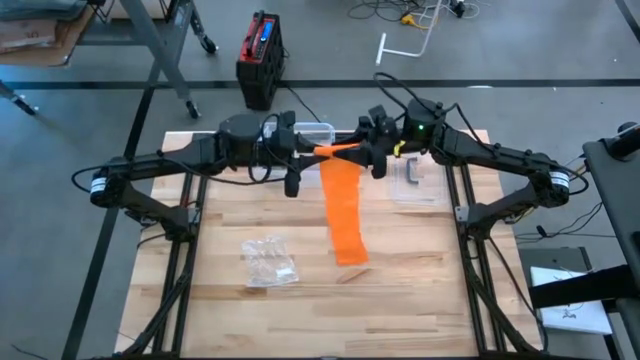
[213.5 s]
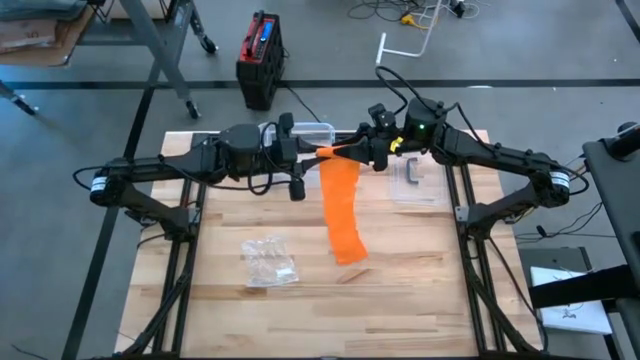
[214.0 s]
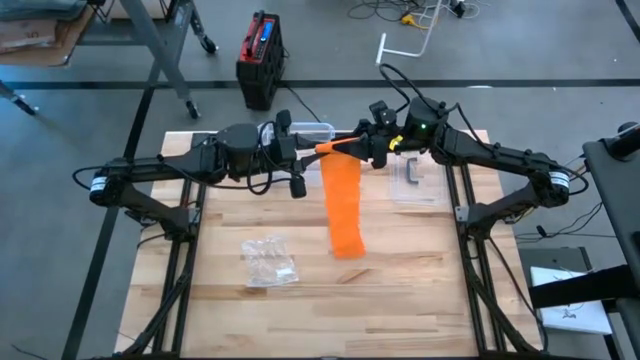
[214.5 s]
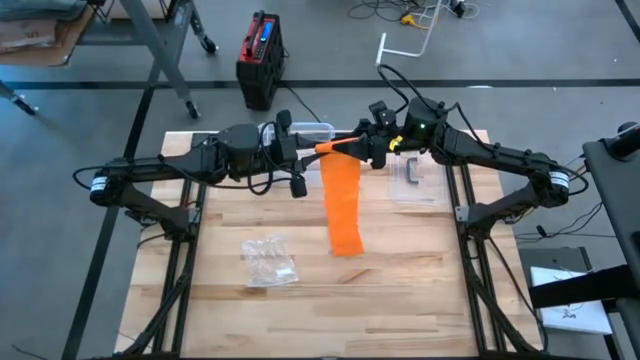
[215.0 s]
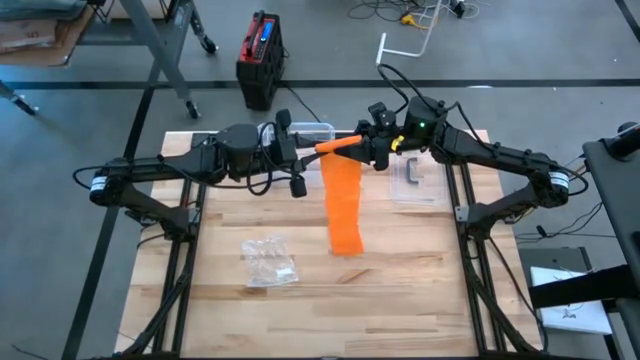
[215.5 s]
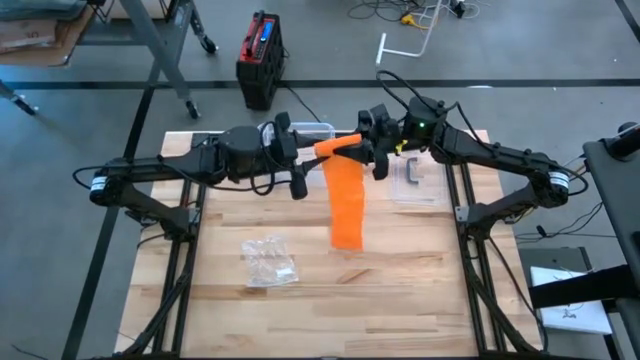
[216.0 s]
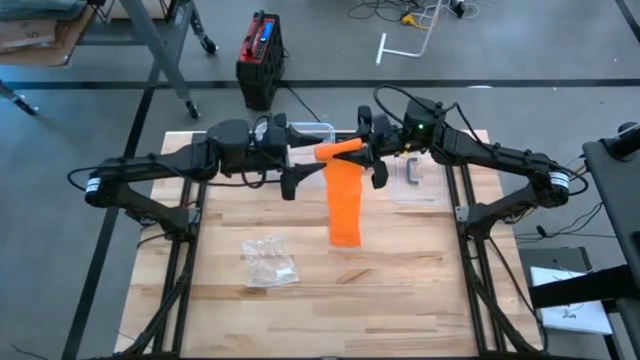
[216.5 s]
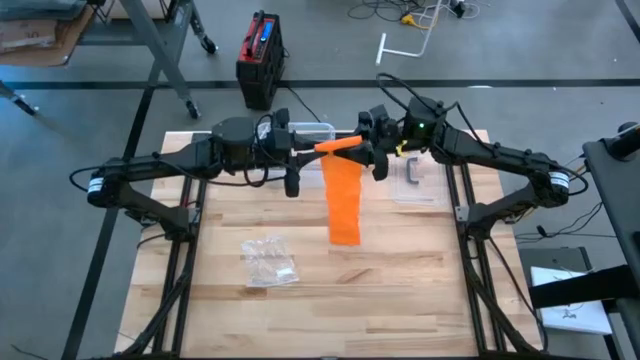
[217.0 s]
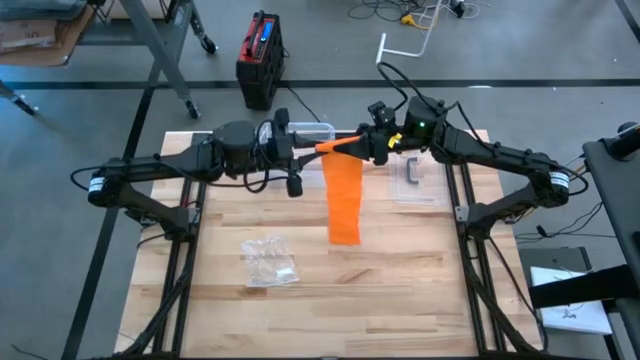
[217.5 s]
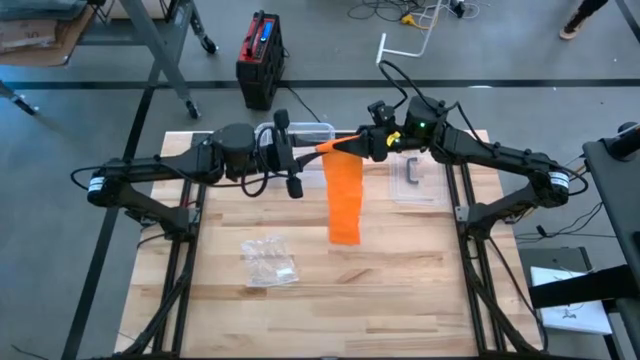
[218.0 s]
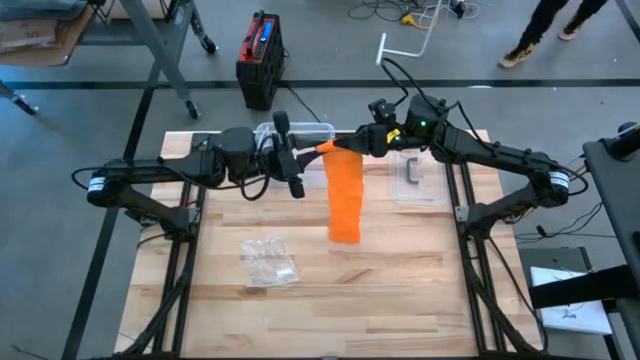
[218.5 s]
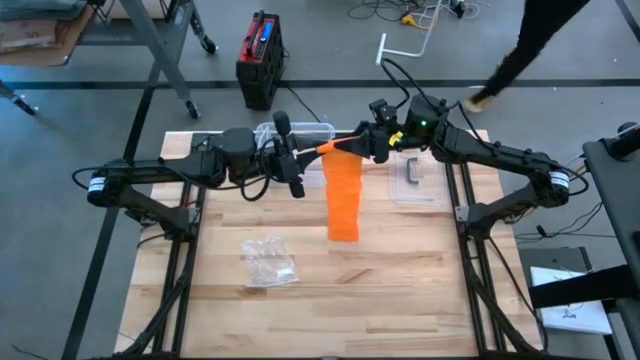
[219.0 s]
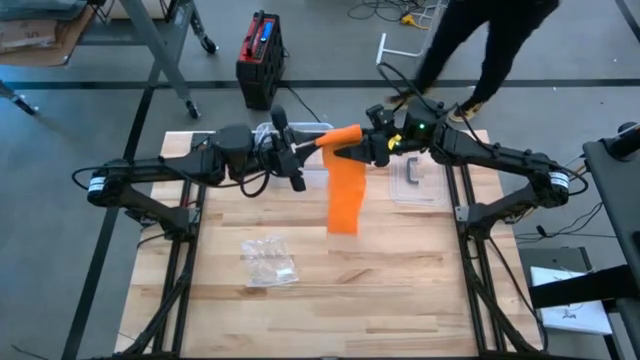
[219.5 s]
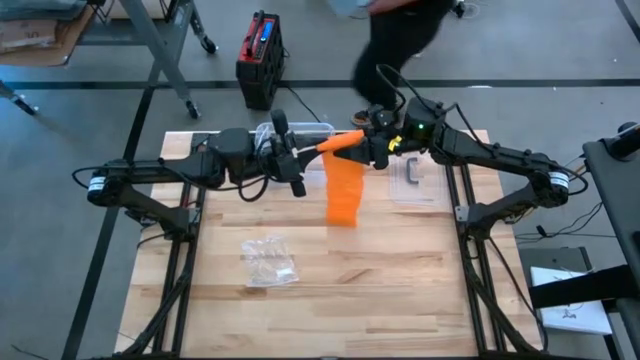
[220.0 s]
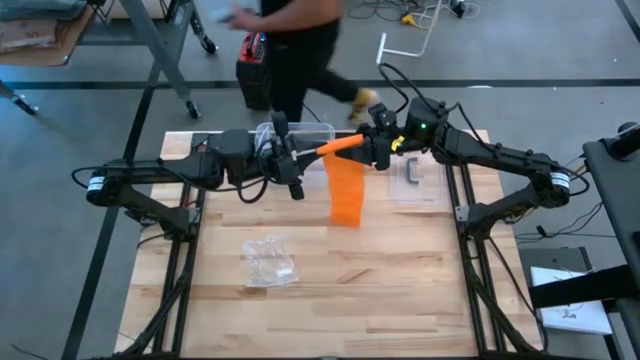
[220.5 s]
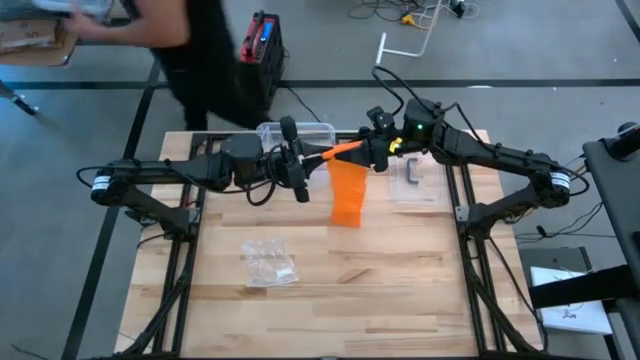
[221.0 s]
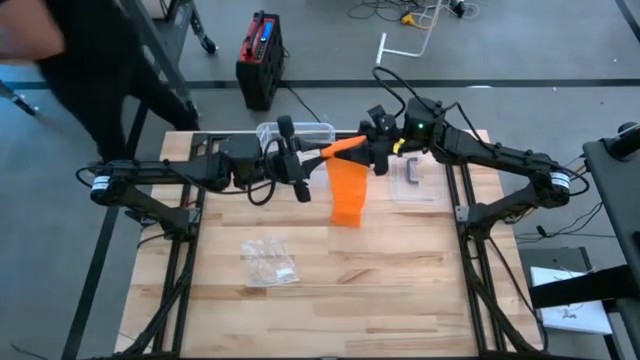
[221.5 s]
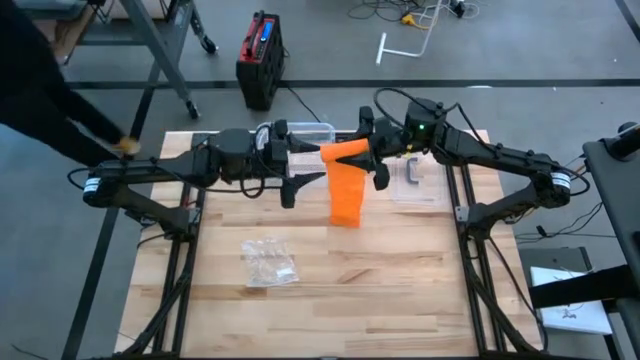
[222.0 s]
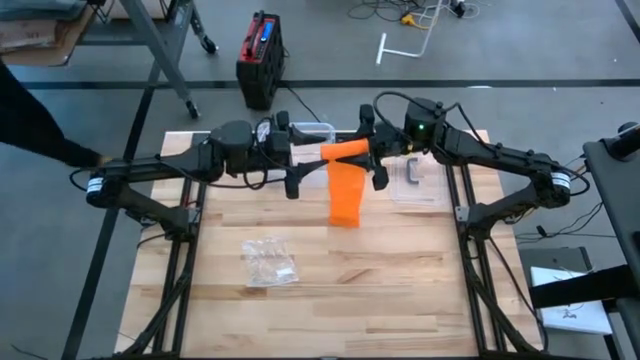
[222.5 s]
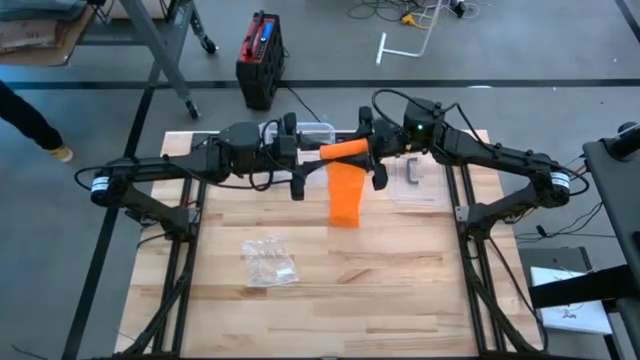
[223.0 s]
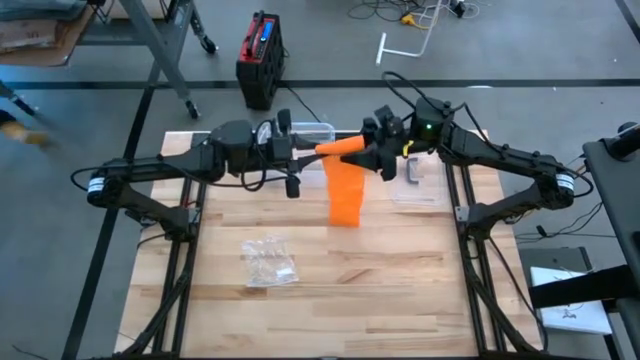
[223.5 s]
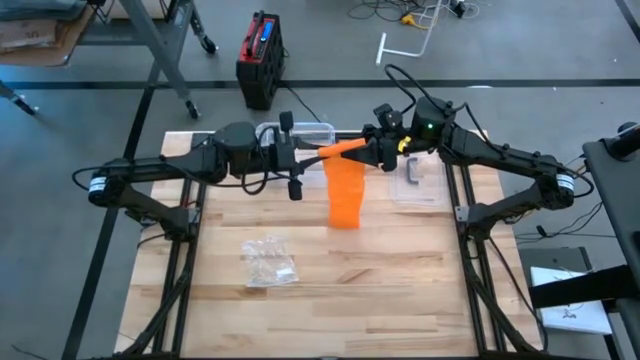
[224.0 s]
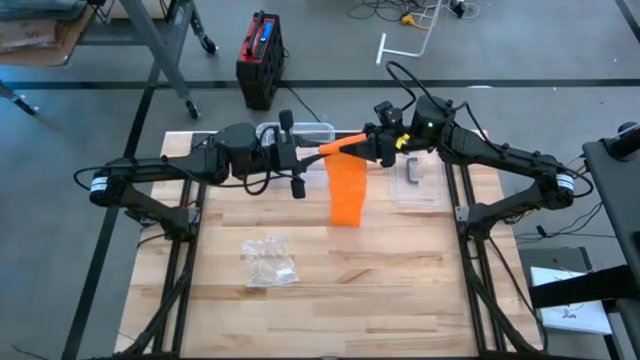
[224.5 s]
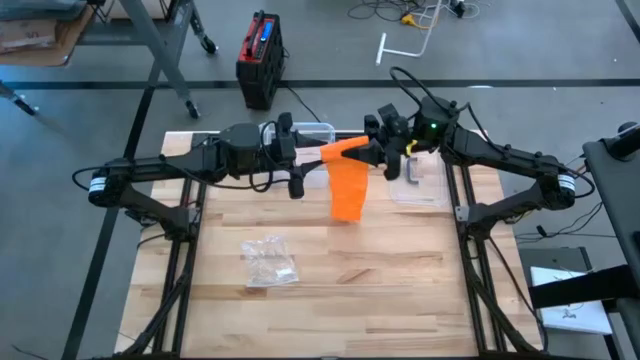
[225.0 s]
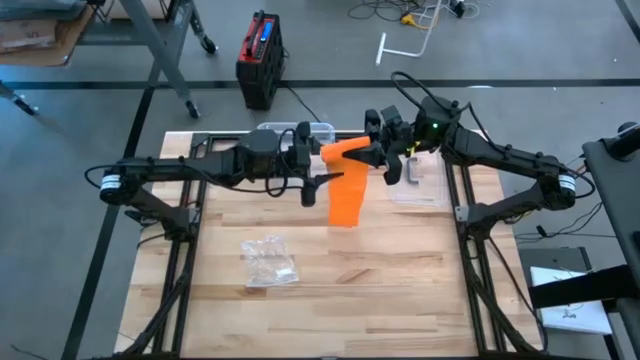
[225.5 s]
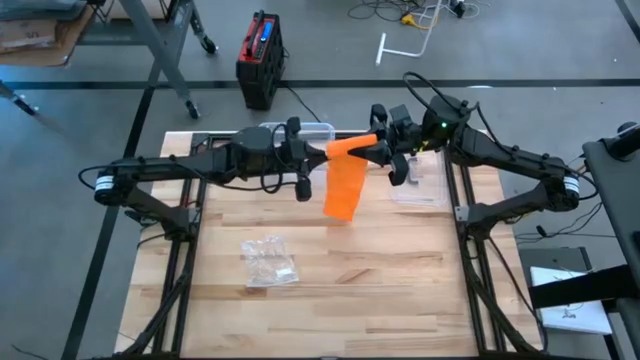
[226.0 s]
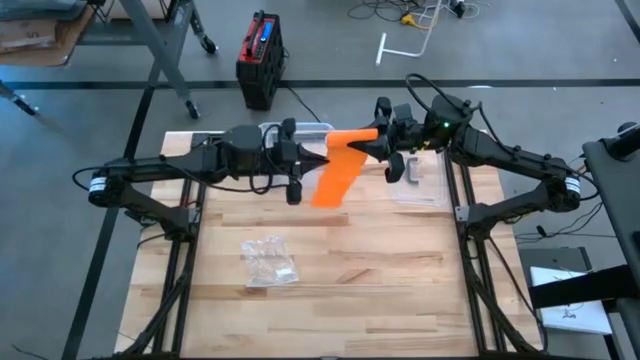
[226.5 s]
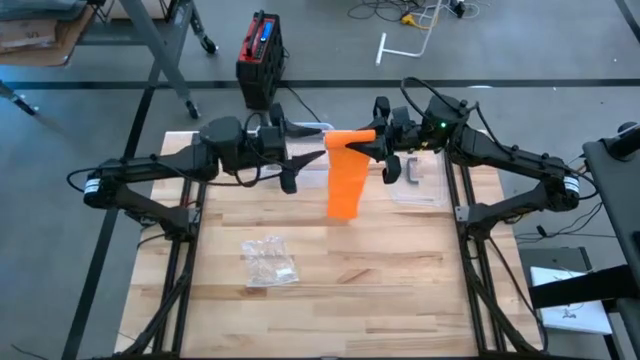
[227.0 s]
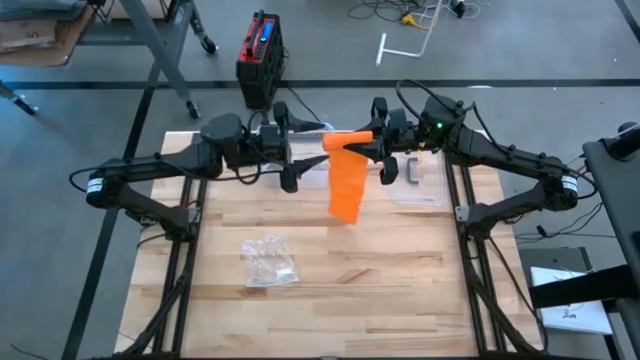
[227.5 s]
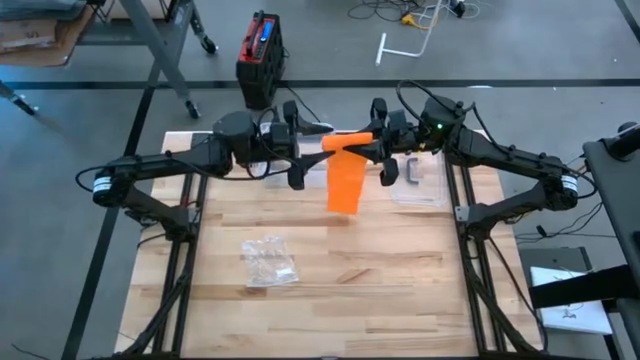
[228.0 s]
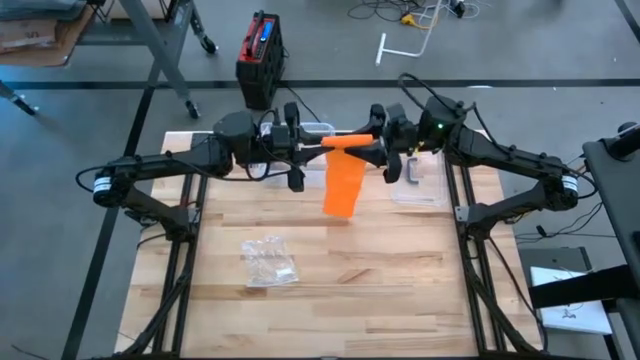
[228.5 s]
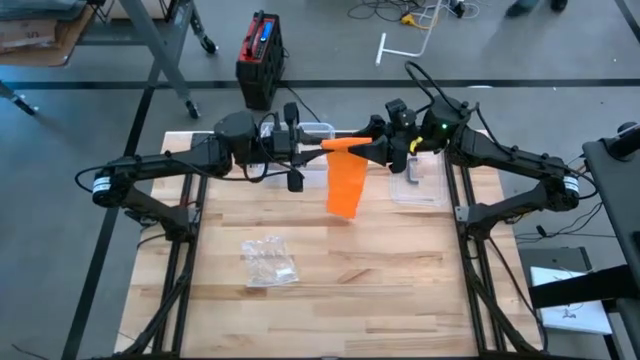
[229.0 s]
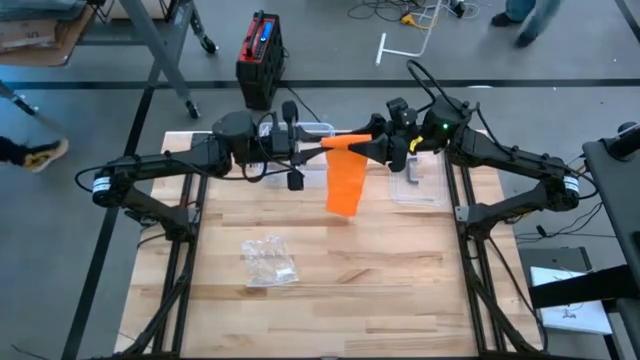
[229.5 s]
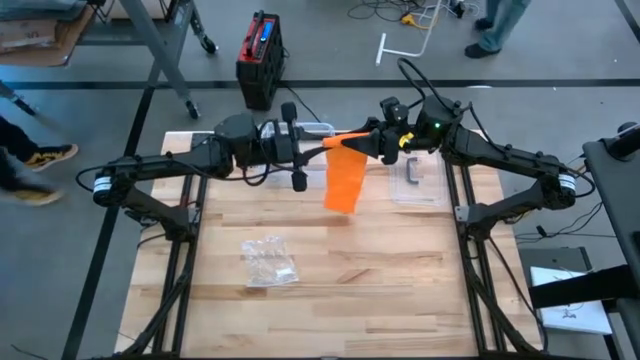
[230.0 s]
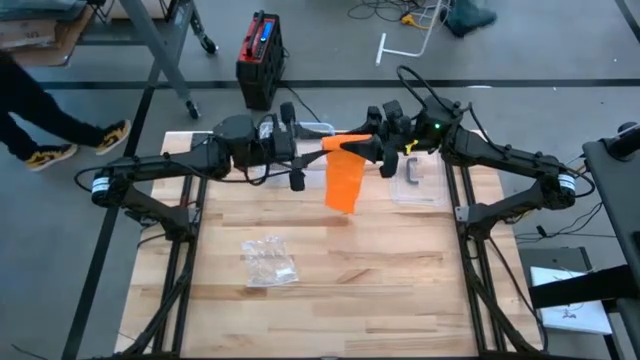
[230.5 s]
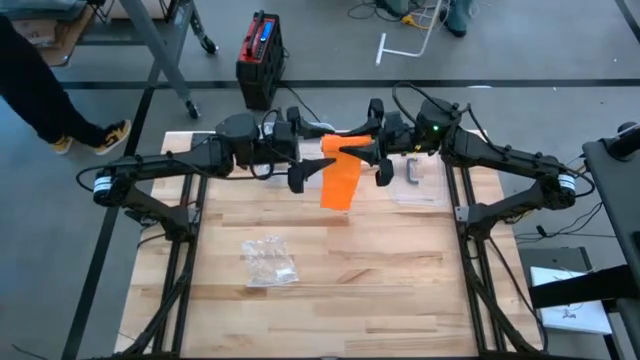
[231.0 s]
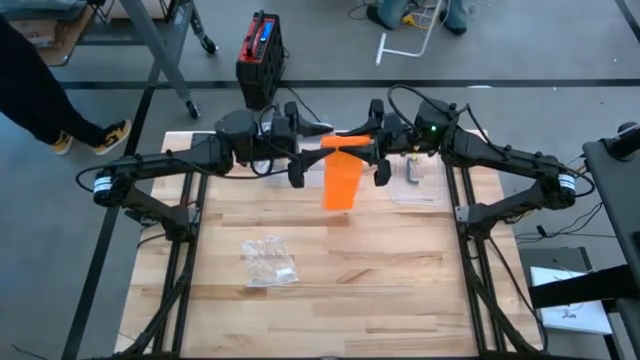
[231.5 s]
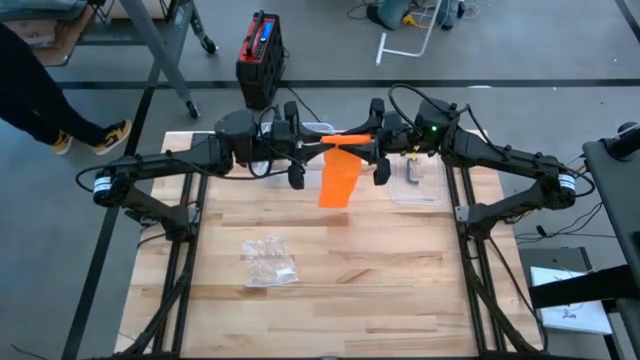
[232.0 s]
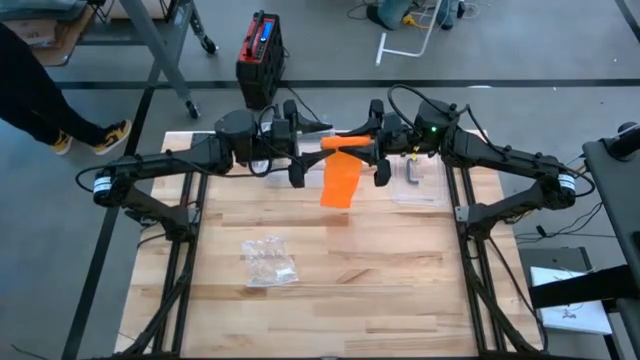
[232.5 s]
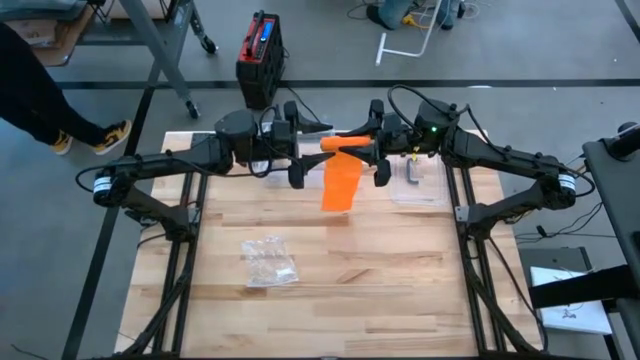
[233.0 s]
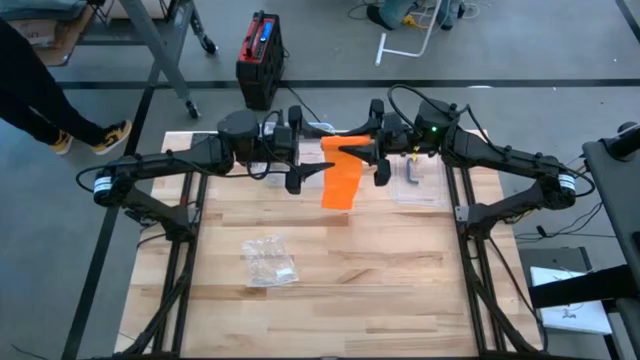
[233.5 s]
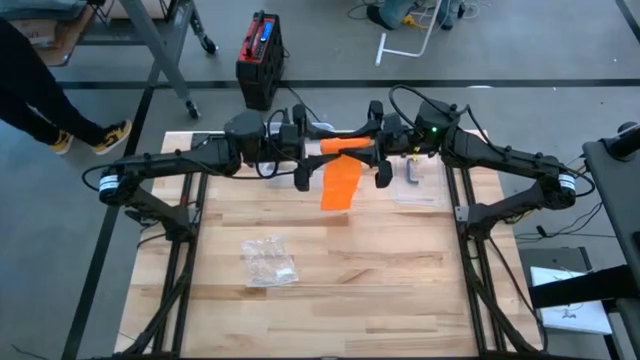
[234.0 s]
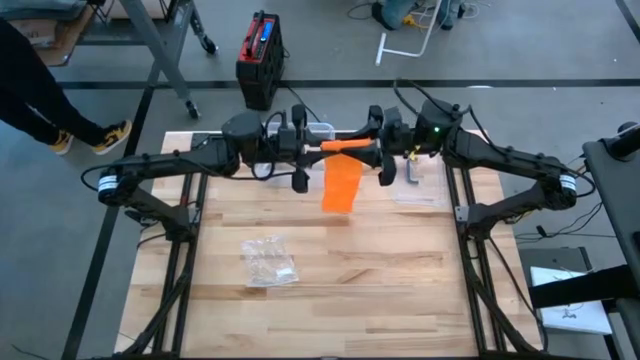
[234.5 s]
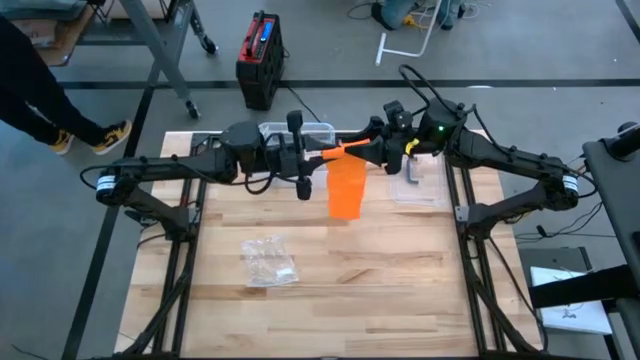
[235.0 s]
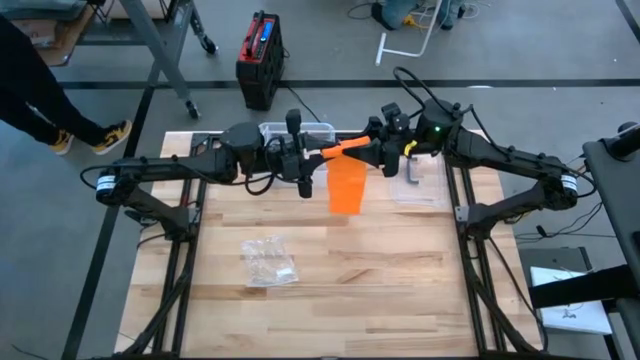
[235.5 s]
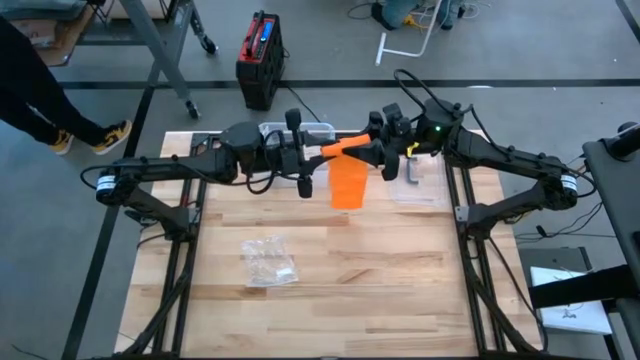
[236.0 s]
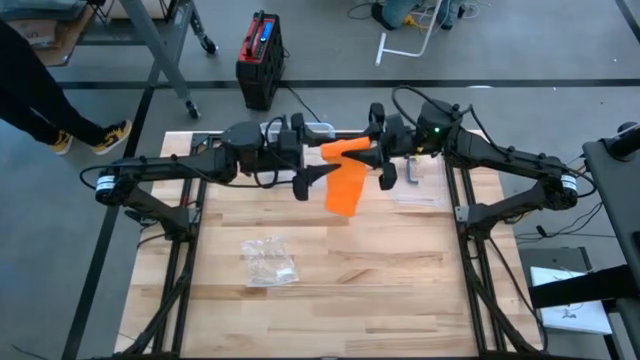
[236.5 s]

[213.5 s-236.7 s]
Task: Roll bandage
Roll the orange bandage
